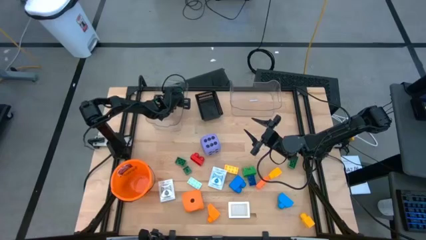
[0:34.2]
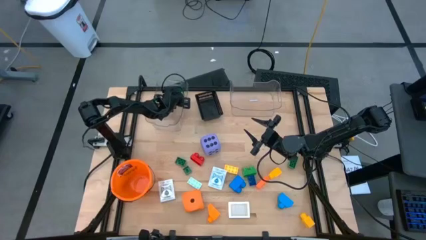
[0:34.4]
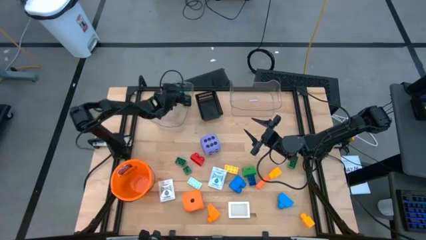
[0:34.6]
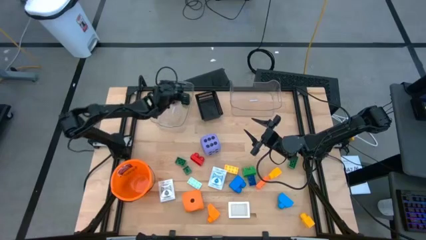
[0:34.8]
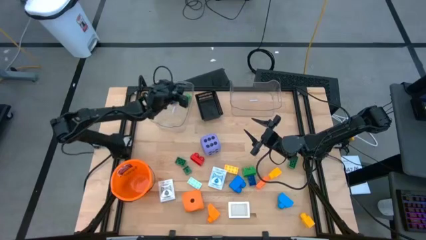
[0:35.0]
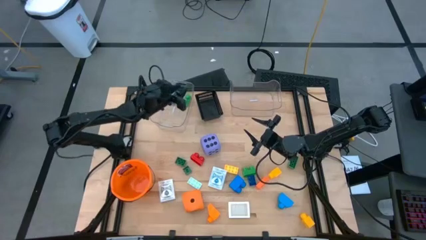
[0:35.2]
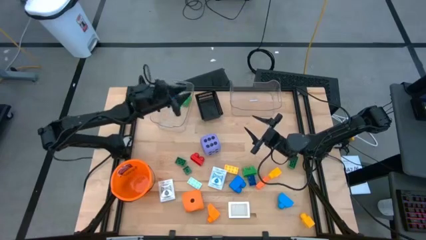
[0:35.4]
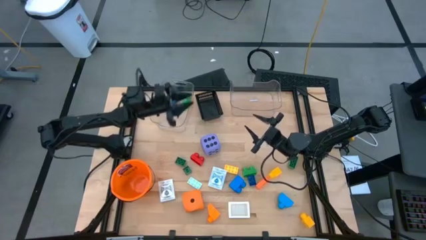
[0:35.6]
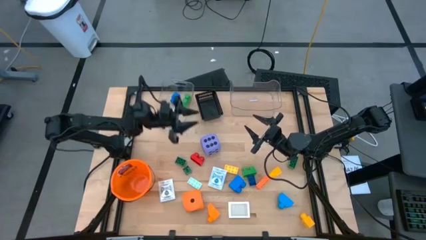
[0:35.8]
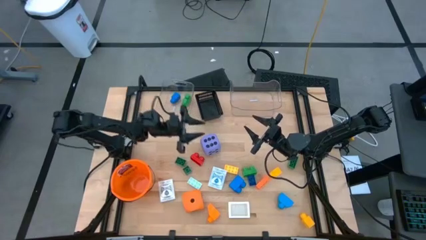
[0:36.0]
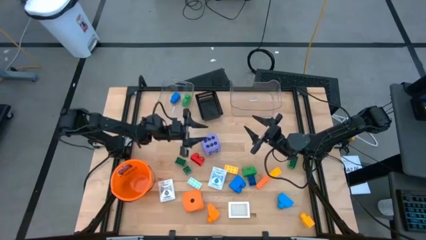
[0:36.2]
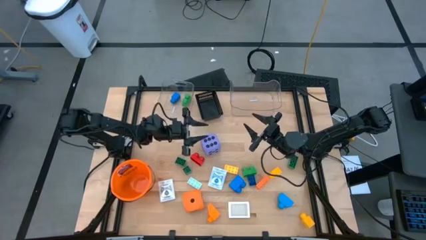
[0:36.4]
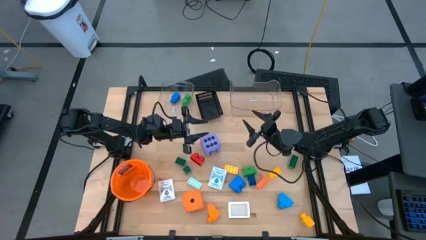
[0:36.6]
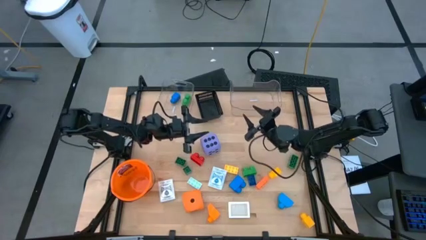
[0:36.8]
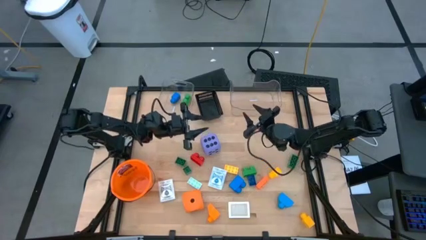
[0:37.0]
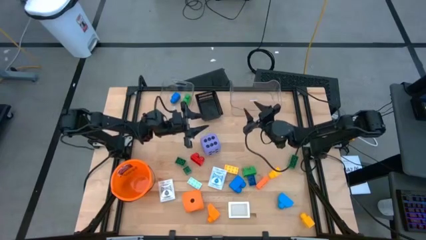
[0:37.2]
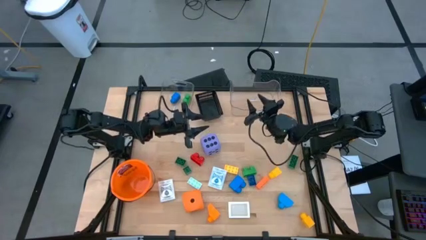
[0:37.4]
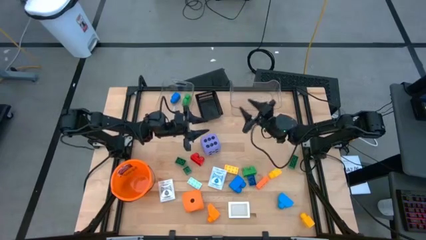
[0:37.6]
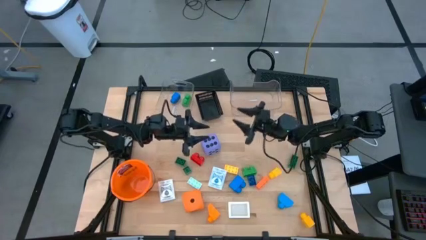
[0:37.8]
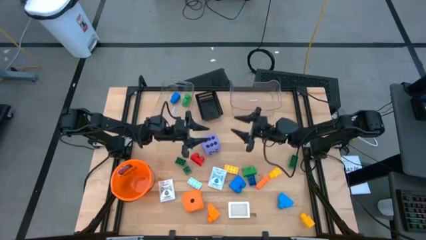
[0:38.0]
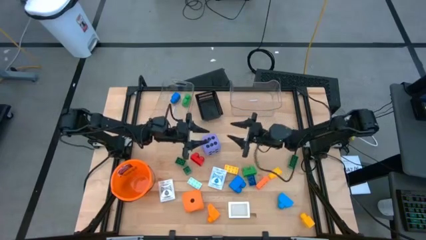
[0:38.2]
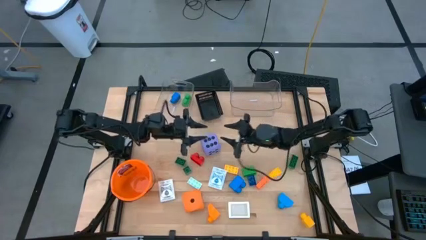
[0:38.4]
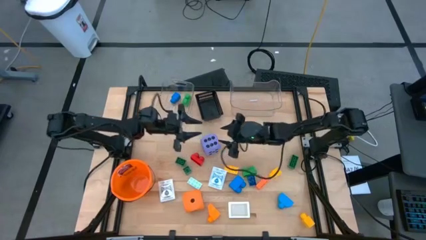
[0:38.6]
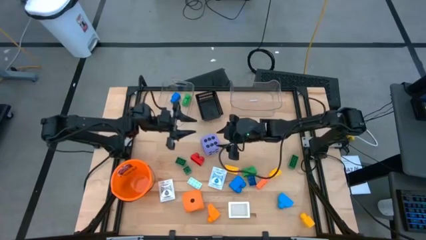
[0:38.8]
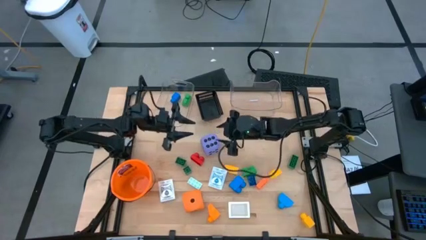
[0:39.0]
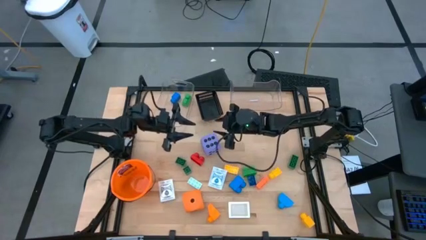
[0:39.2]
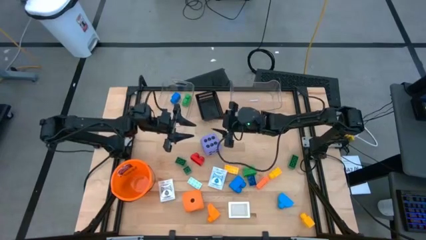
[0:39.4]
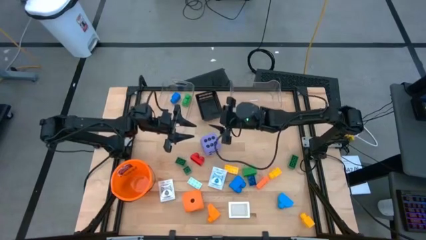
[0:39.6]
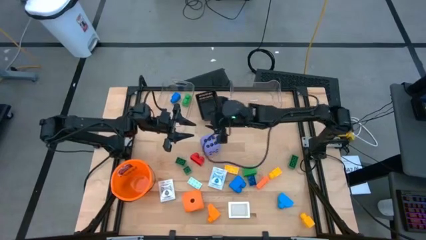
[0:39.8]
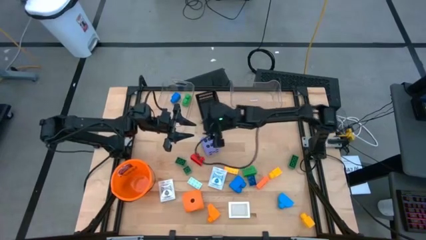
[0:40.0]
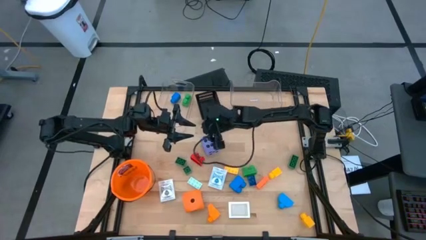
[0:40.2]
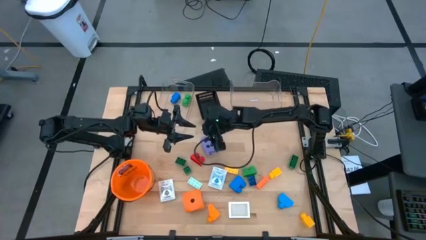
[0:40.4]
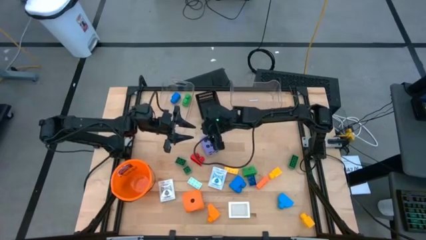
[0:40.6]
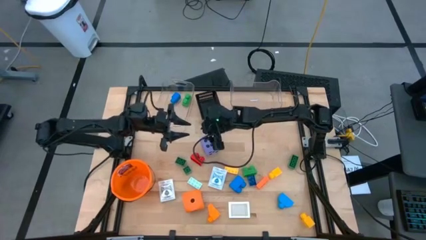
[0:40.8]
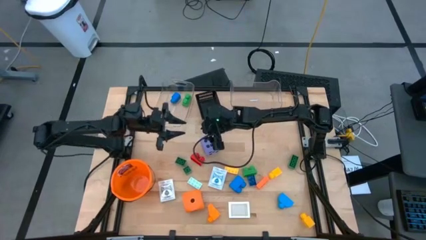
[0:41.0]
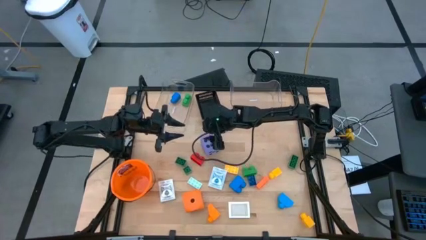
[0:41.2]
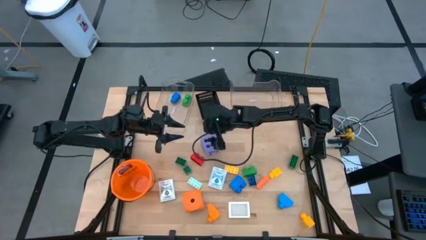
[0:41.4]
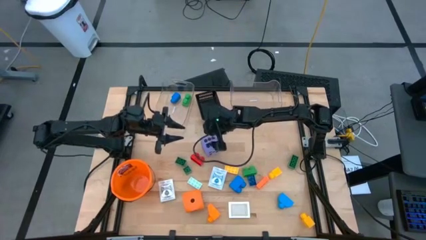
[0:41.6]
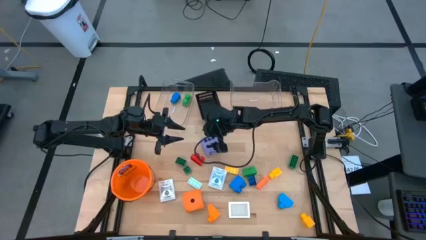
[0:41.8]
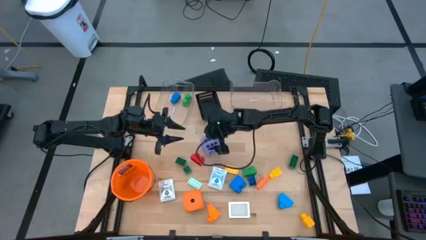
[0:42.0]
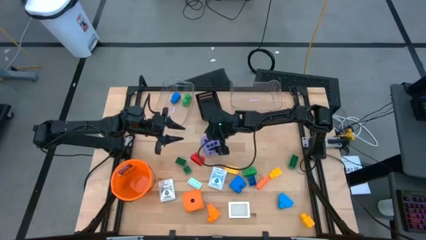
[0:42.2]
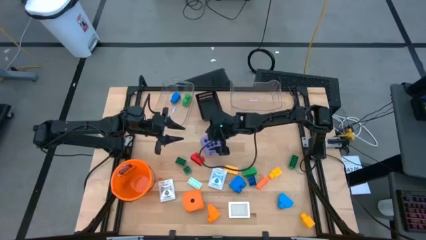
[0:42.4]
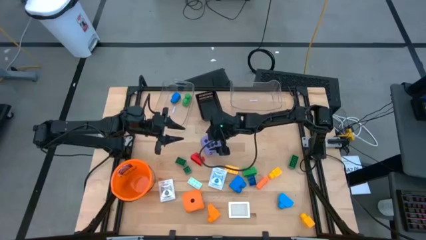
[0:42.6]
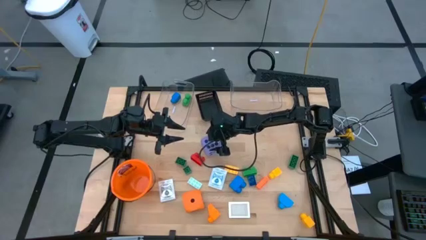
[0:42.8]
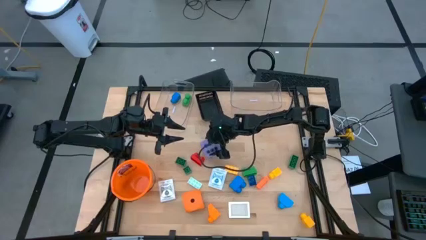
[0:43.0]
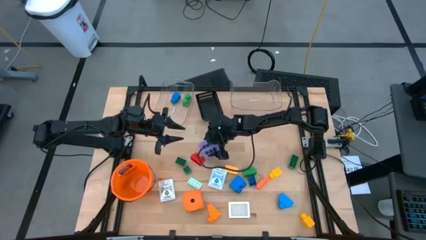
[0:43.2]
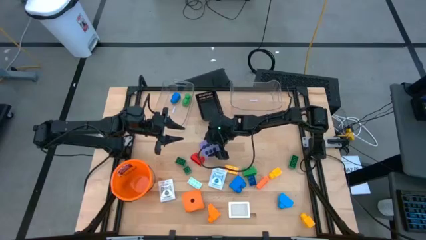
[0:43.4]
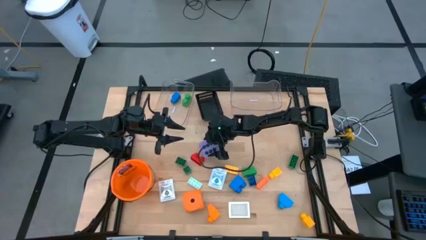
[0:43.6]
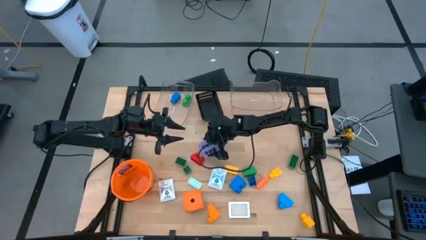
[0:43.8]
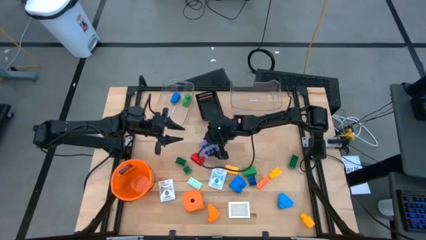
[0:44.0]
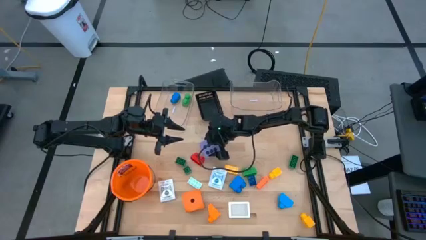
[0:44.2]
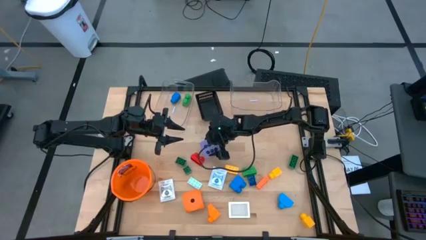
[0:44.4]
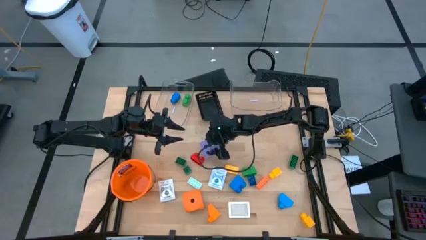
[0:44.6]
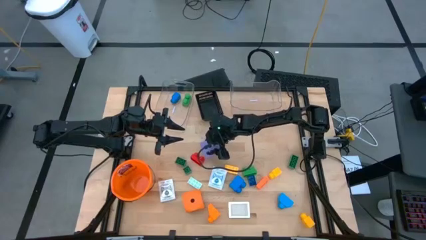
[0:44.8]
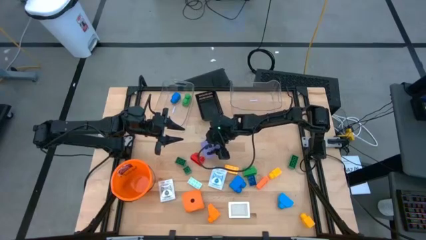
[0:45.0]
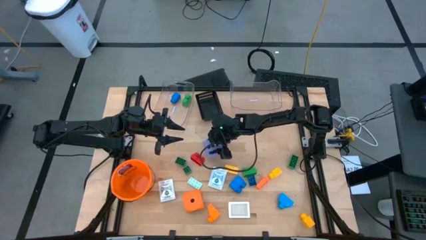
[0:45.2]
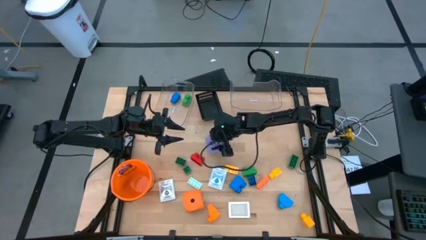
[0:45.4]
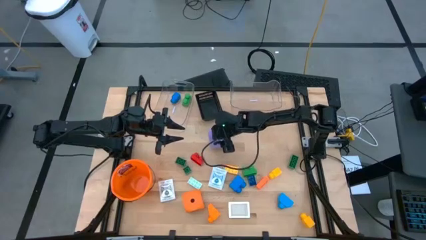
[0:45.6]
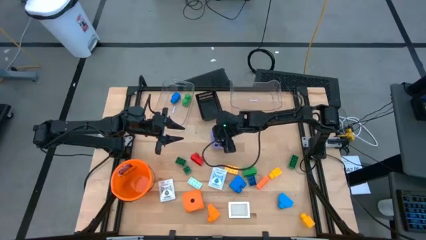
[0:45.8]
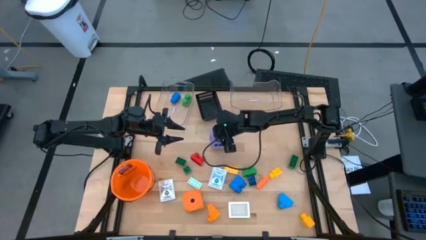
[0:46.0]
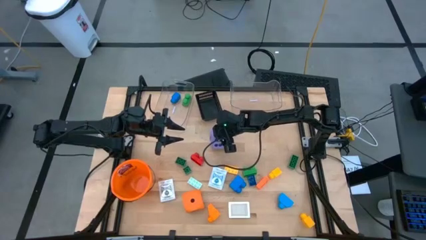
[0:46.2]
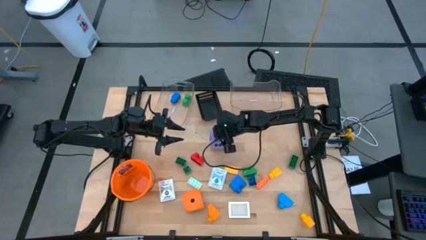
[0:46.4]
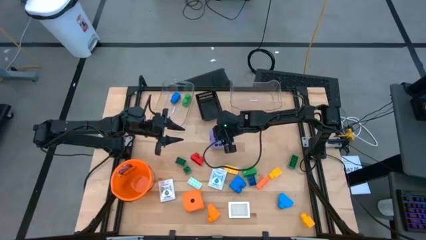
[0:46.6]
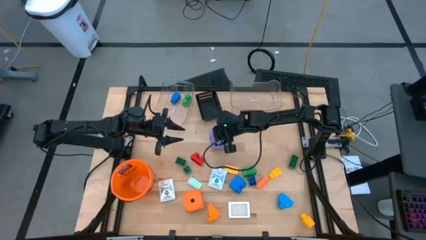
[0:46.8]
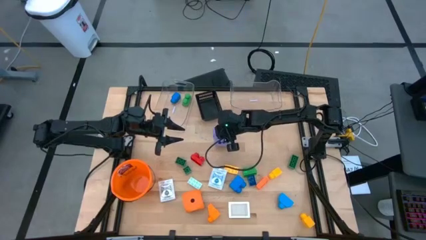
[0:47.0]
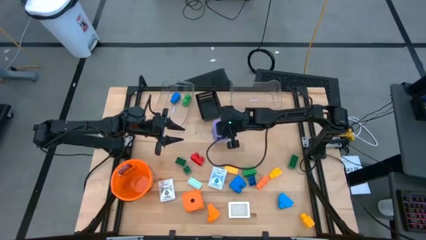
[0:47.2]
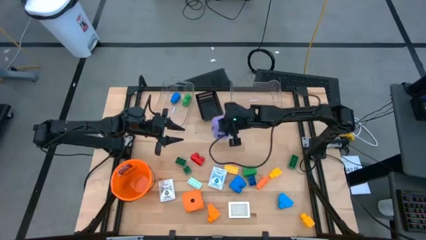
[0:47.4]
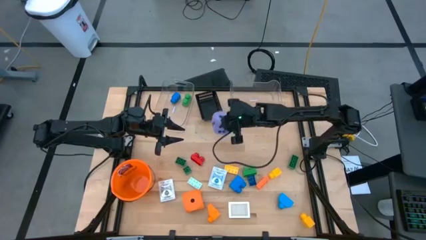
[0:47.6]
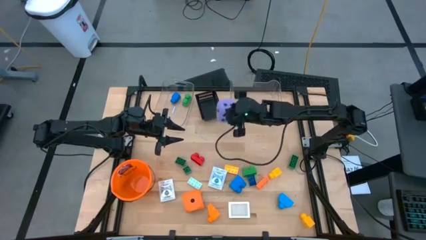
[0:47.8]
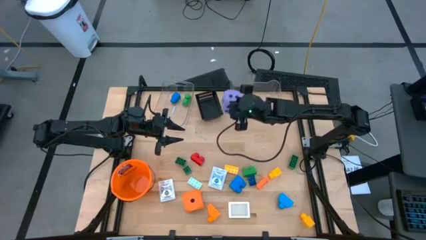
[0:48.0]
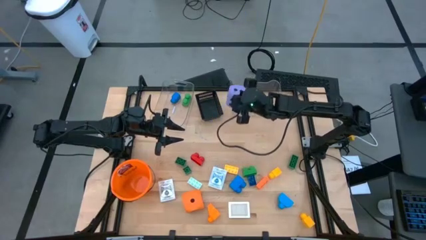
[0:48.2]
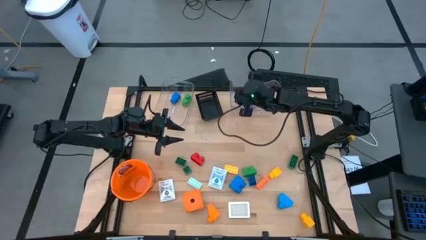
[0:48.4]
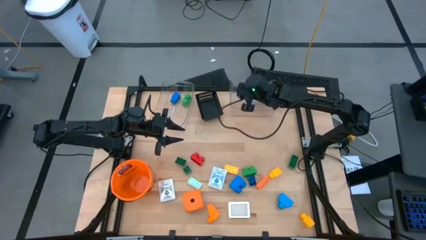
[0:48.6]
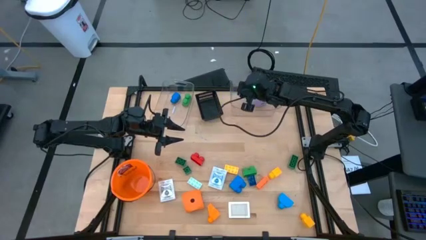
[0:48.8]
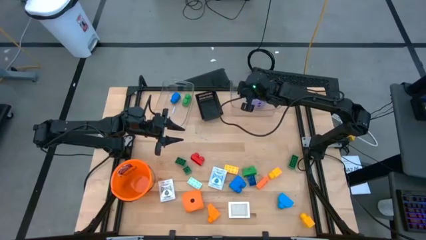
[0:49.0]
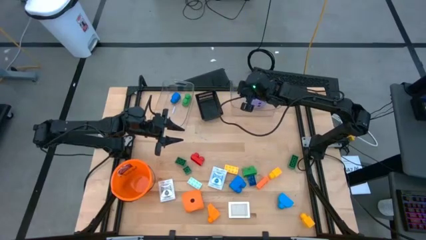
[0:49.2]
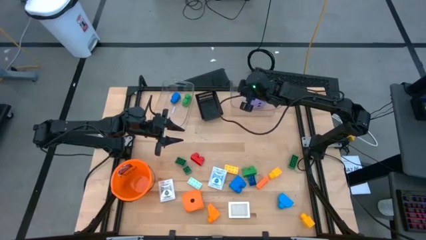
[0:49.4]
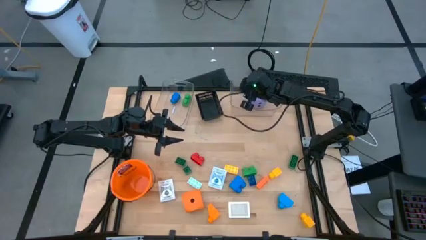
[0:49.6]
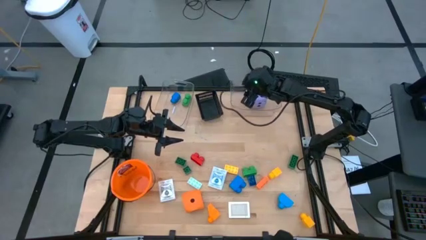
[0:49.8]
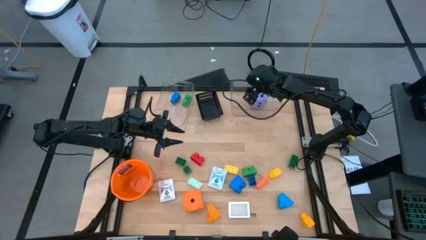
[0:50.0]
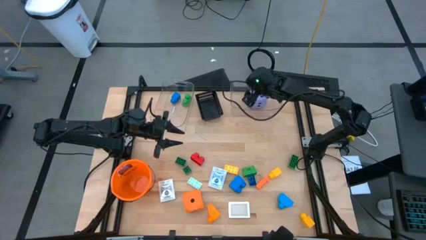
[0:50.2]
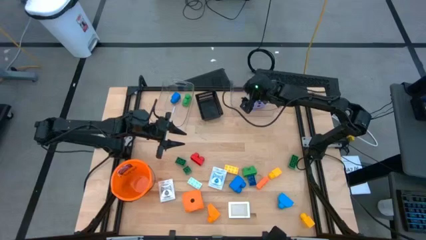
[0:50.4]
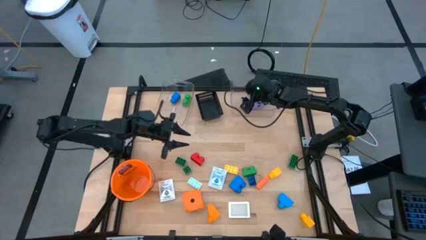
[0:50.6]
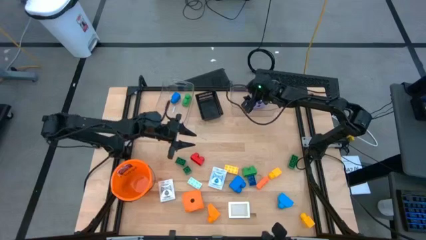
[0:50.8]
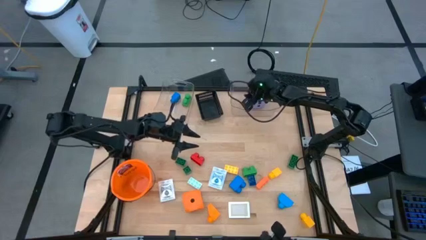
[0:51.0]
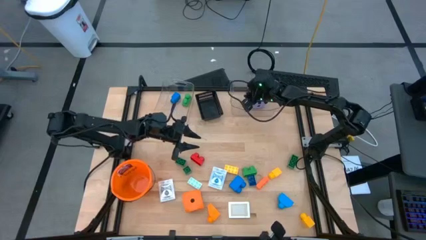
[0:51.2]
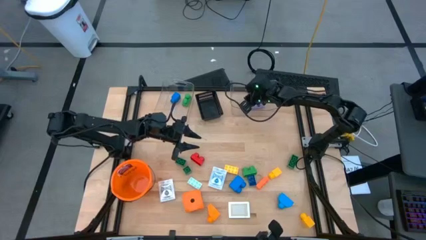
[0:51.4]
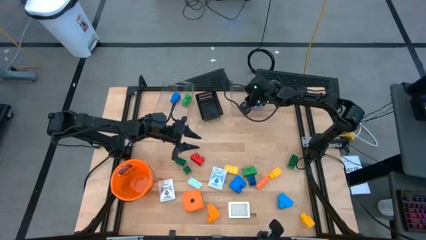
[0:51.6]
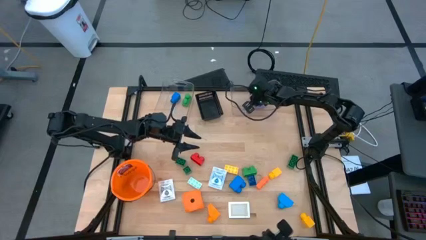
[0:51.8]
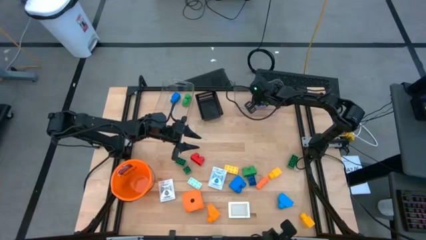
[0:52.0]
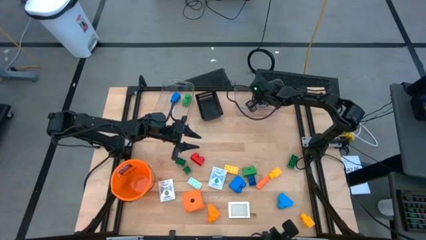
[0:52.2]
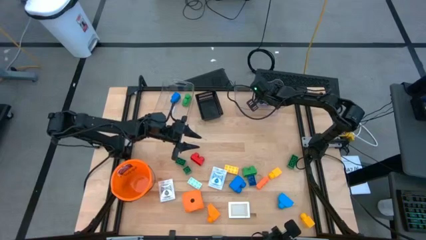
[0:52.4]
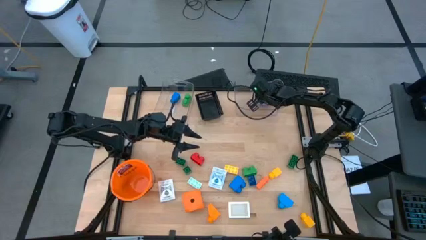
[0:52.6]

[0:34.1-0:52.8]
Task: Pick & Place Toys
Put the purple dice into the right transparent bin
